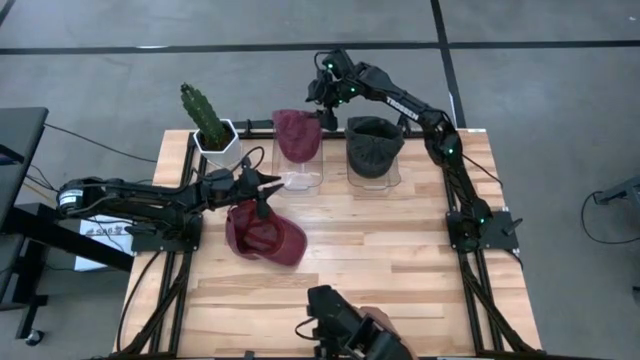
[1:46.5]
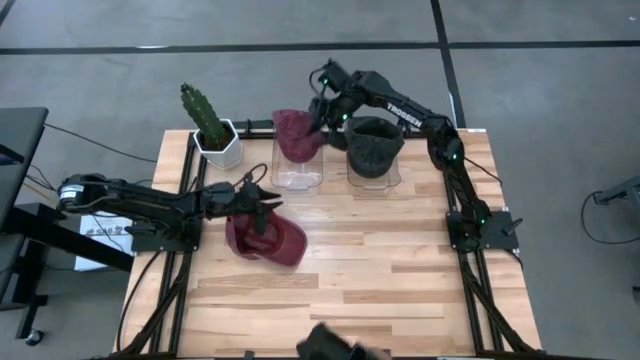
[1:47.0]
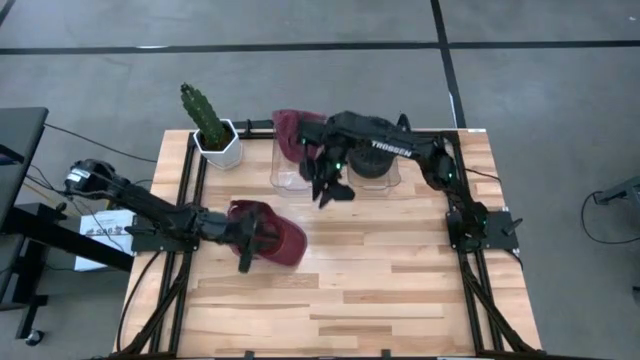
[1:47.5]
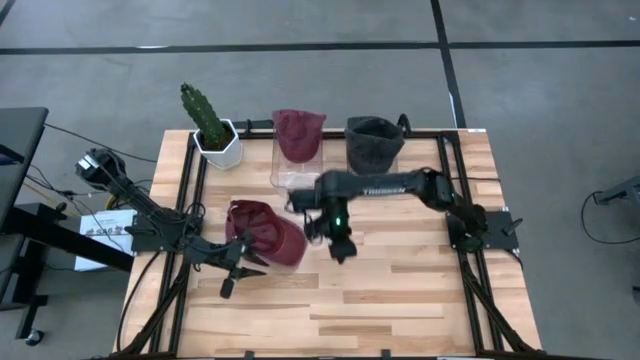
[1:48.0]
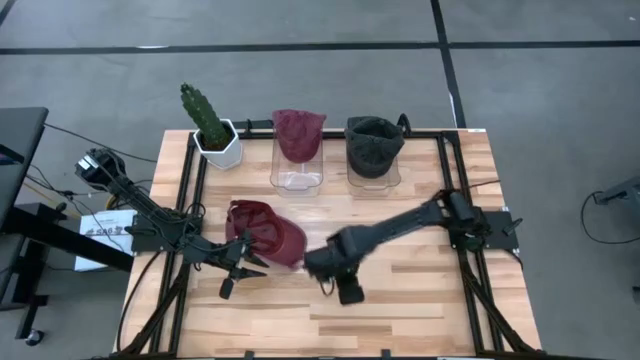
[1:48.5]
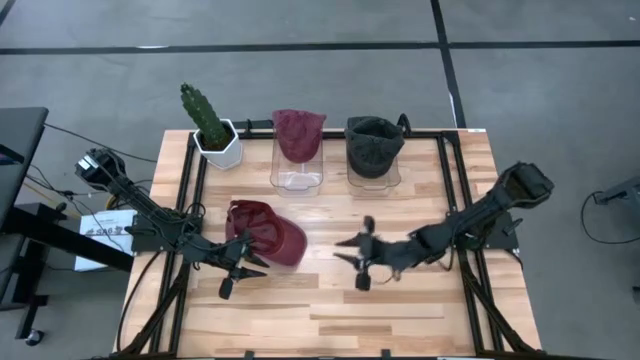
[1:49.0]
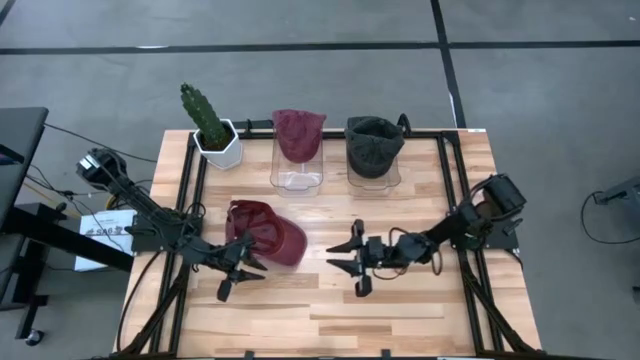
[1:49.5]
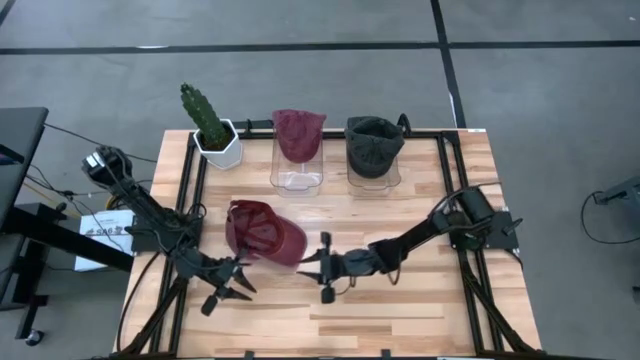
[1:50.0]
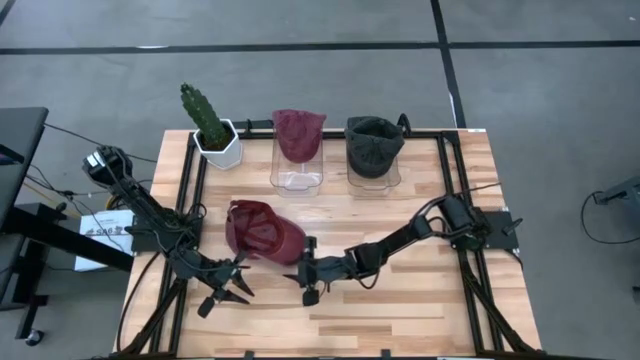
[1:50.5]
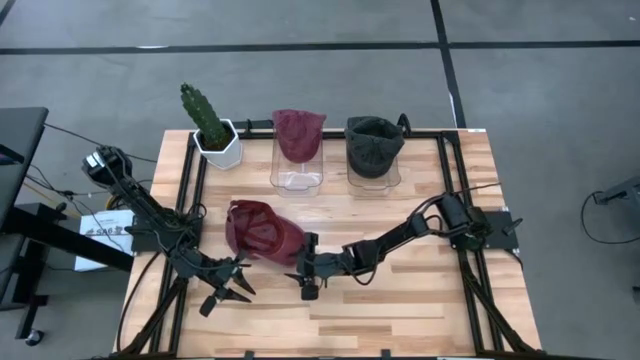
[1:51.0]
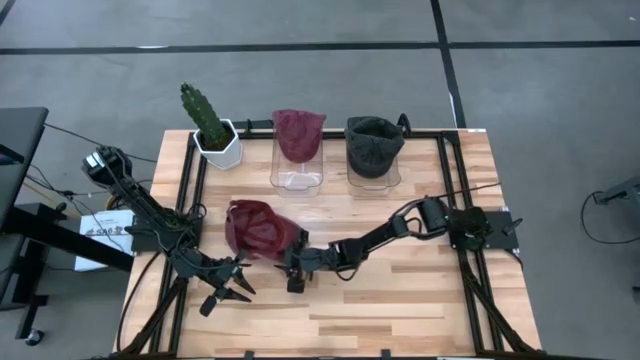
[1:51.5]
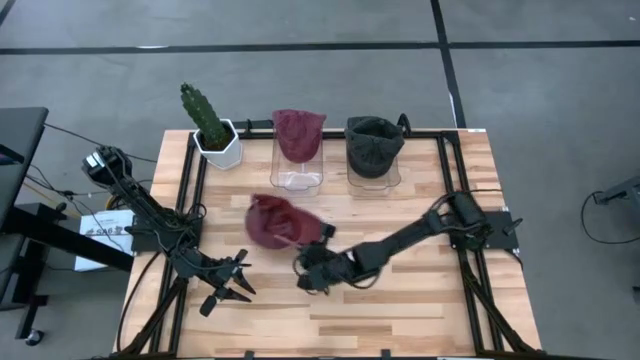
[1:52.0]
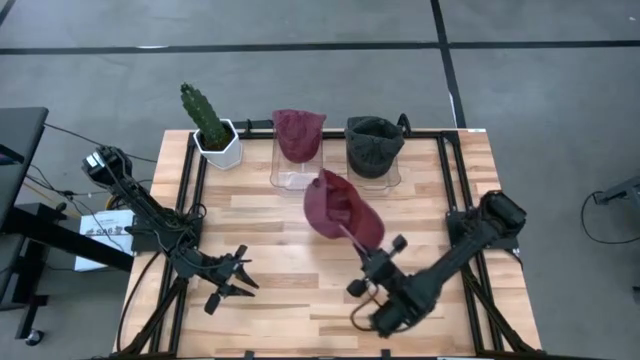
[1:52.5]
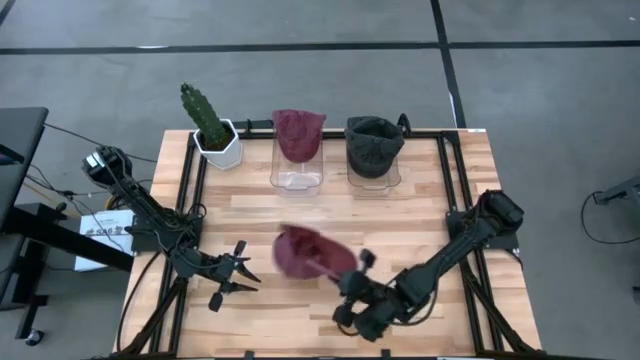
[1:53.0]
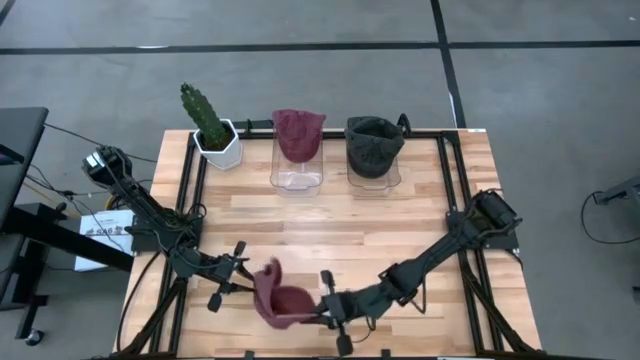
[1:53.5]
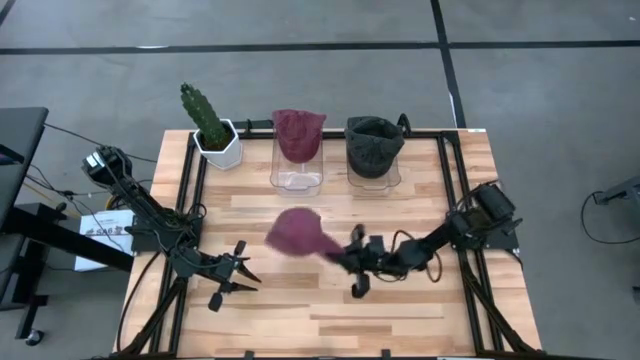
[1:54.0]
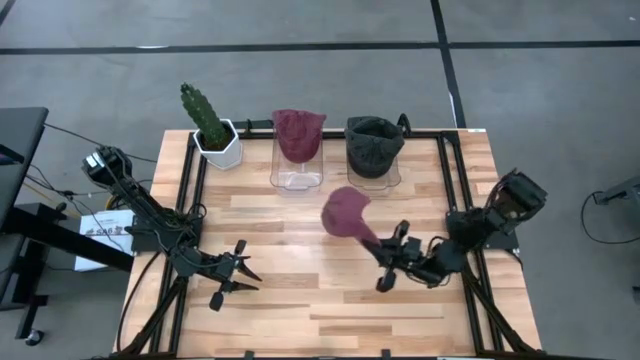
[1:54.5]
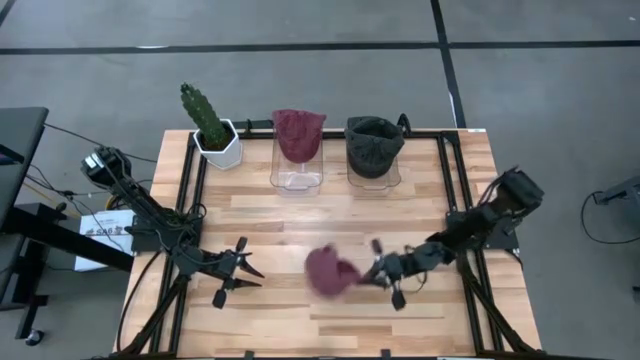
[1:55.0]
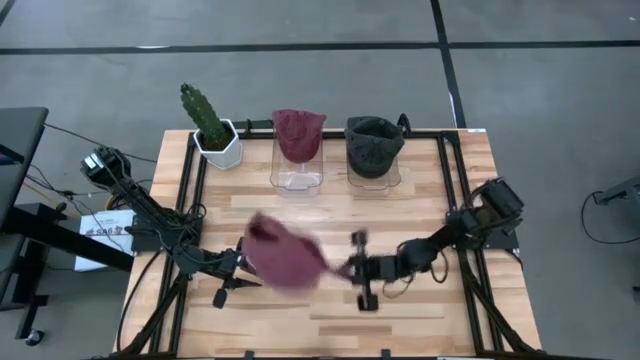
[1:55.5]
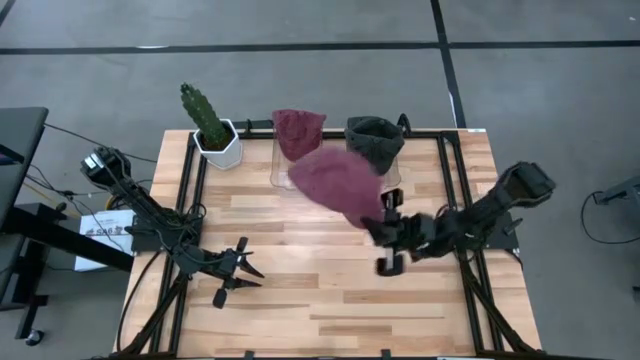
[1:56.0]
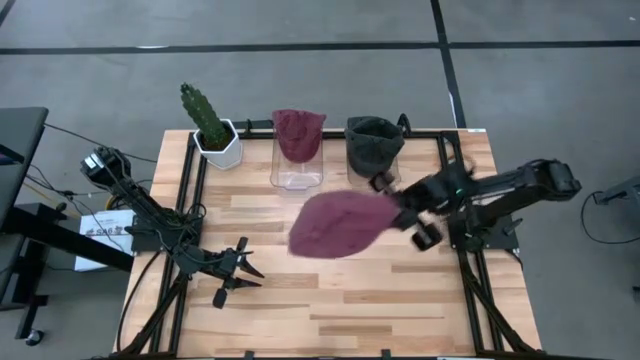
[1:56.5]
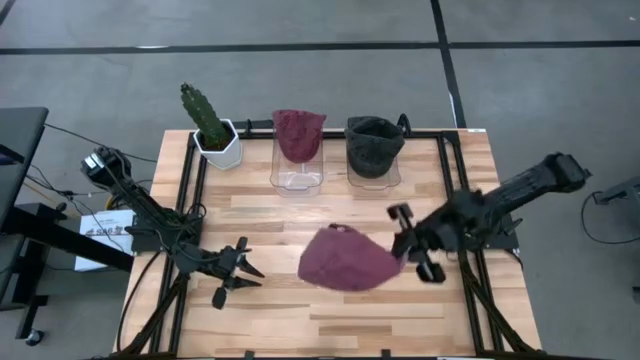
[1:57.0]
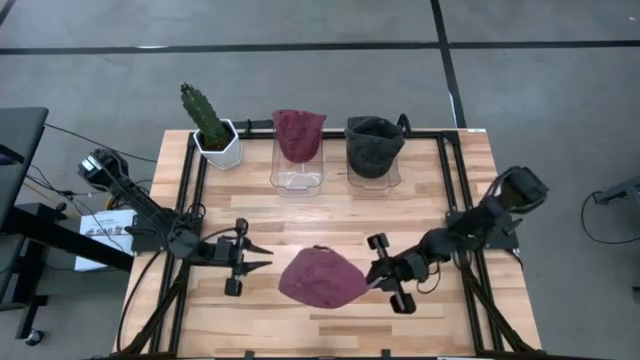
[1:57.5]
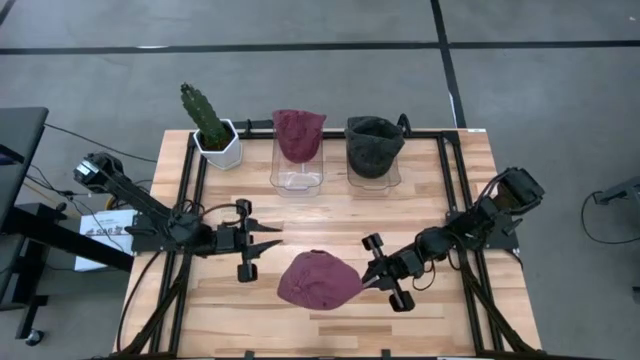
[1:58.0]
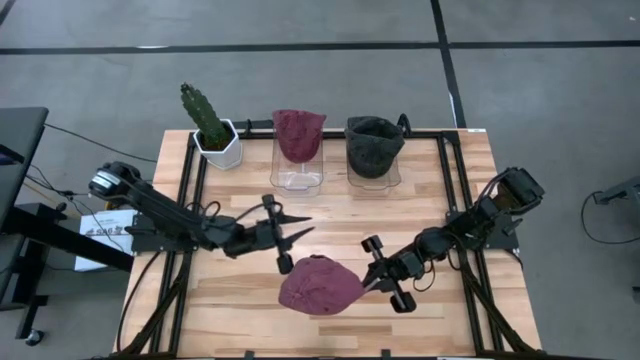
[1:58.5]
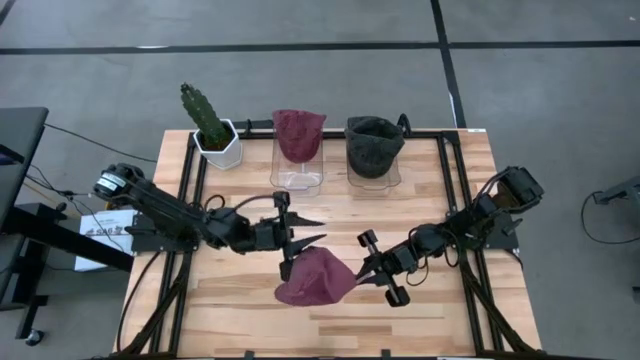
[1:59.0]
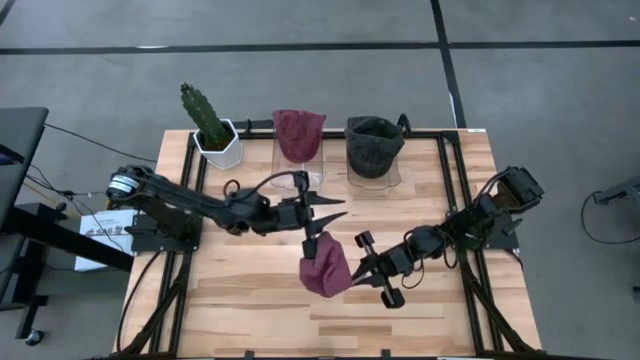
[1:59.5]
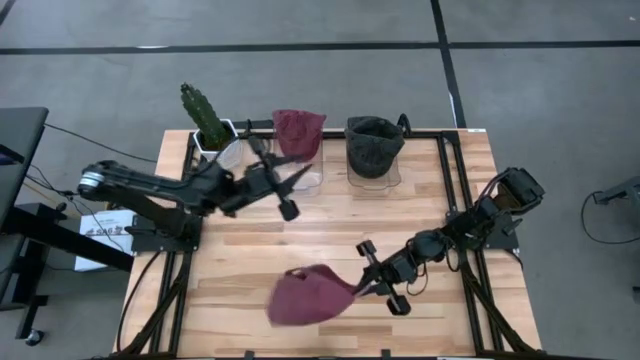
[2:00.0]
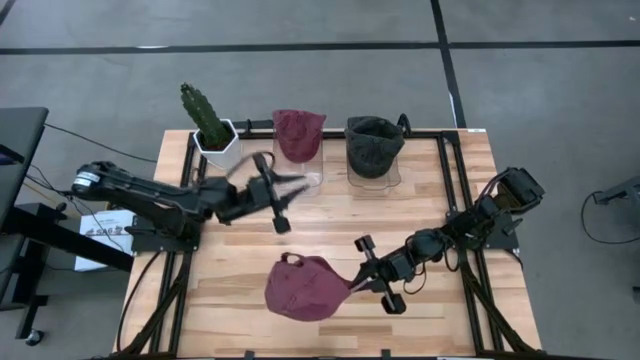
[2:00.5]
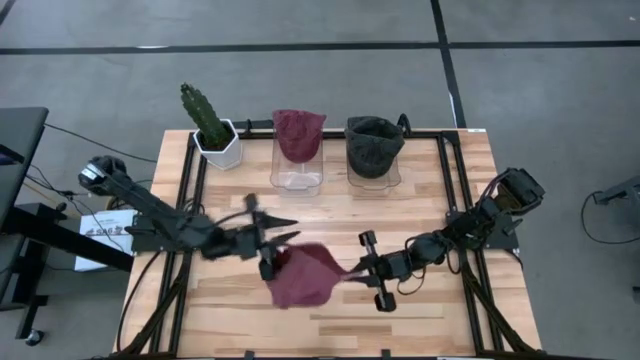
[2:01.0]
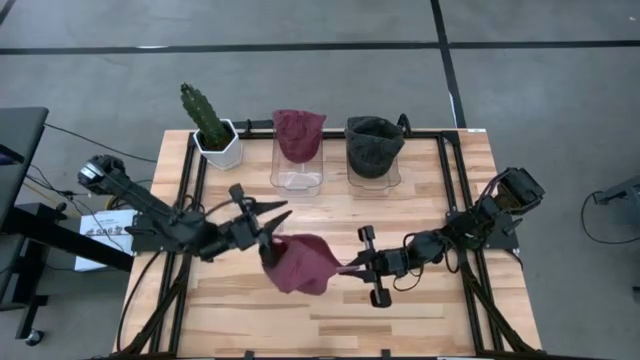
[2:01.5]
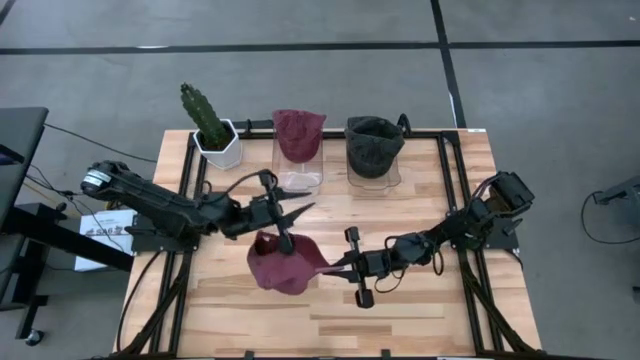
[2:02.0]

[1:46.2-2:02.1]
Task: Pick & Place hat
Put the red cap into the transparent bin

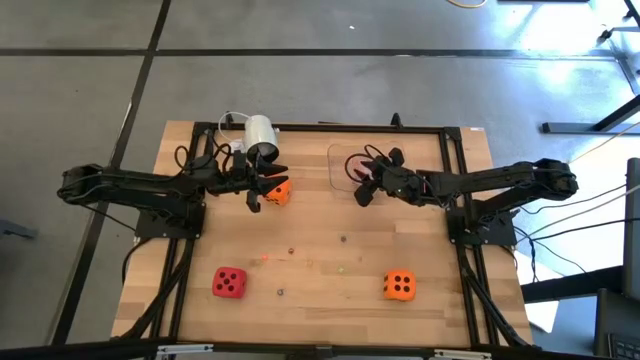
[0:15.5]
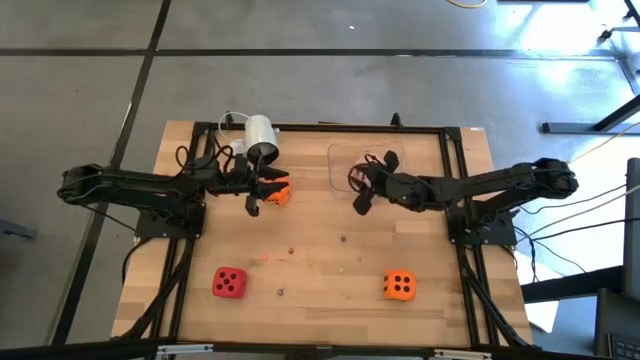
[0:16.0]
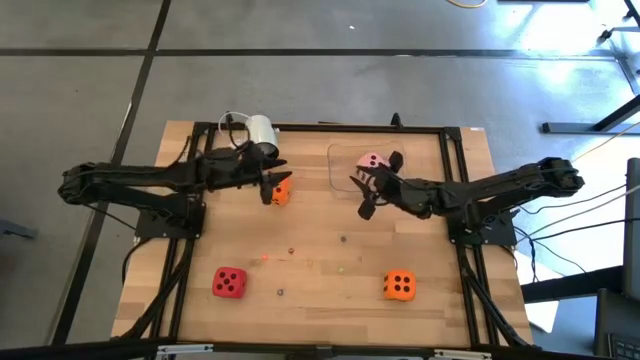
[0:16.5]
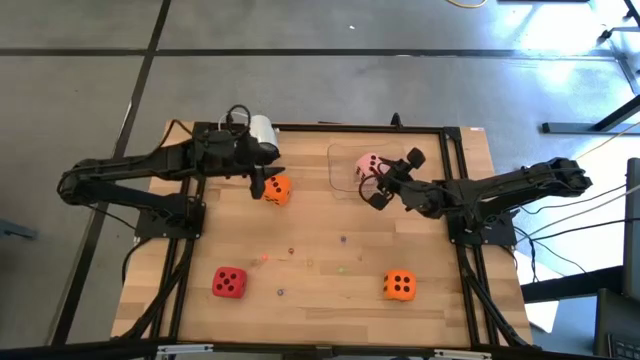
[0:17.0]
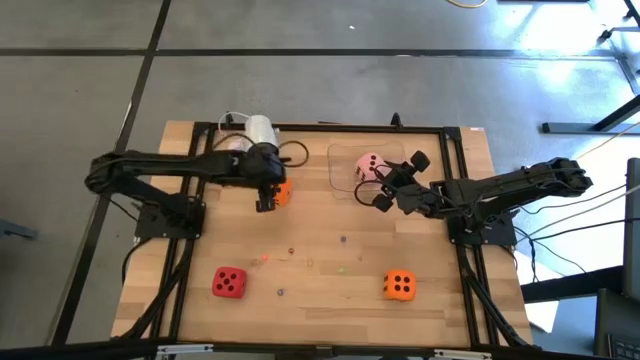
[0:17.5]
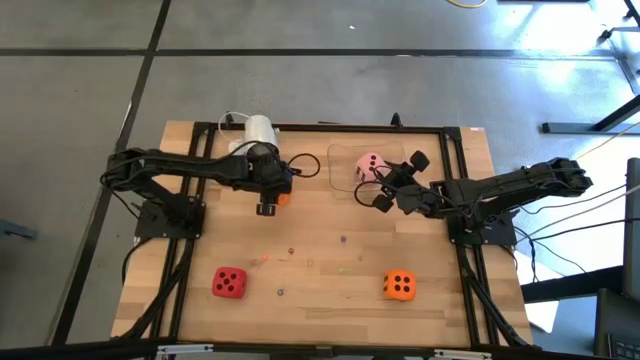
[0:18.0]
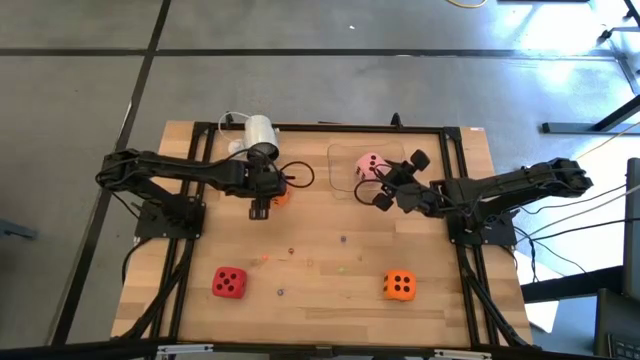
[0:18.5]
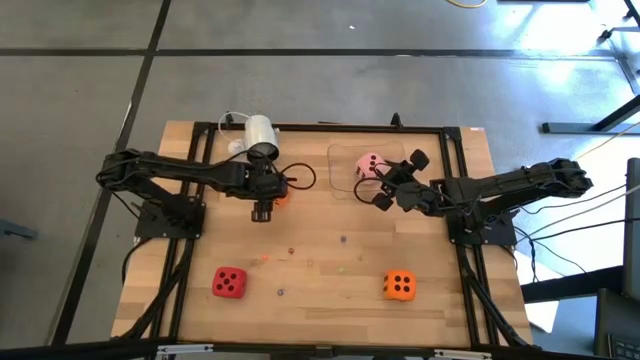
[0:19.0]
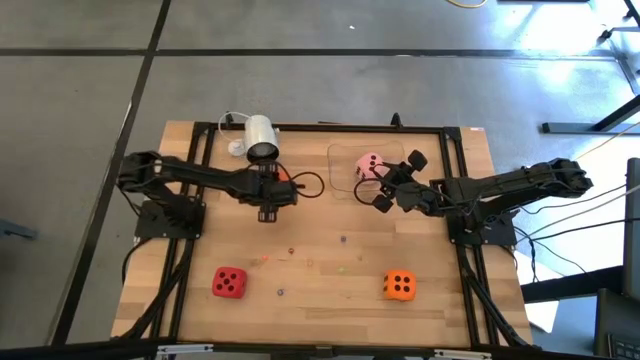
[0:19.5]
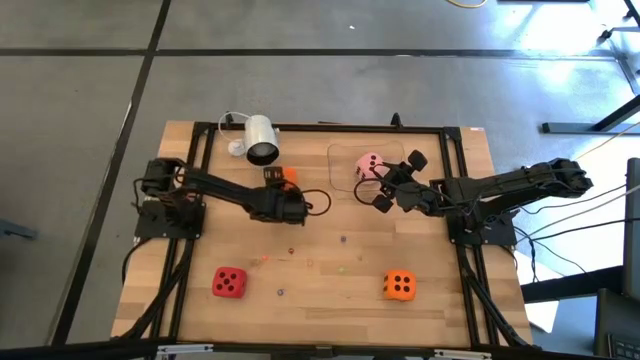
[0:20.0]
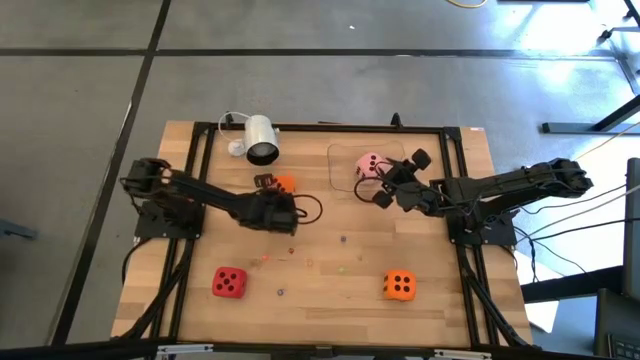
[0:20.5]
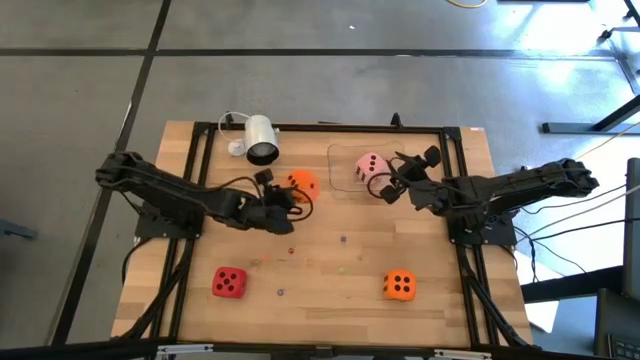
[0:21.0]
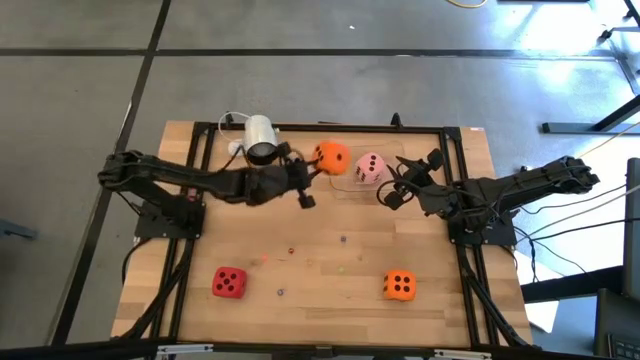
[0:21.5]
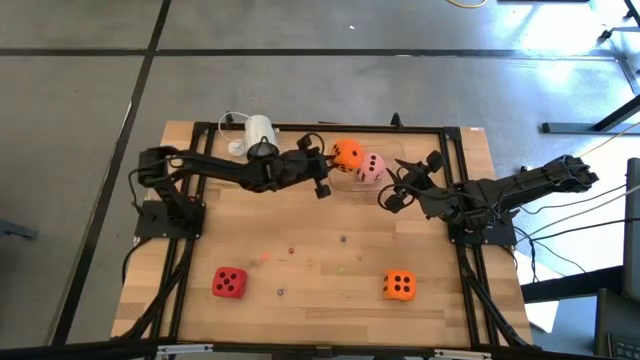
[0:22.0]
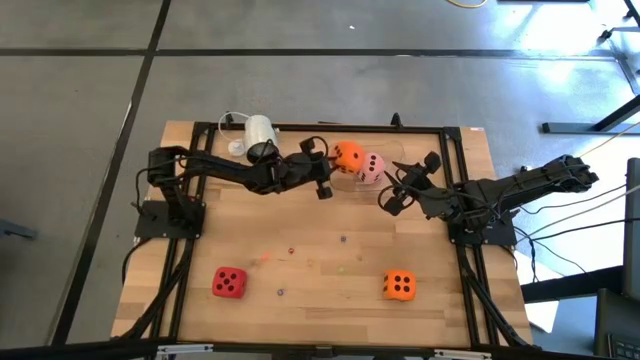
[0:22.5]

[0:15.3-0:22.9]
Task: Pick & Place Dice
Put the top large orange die into the transparent bin
